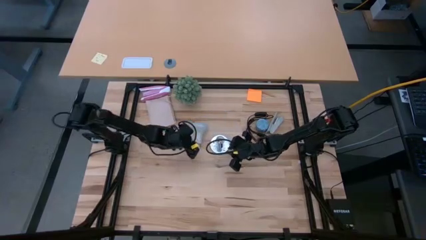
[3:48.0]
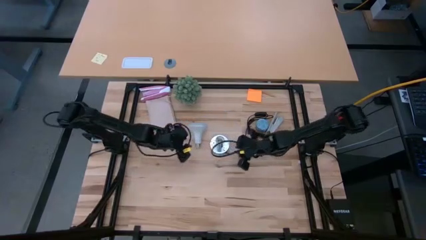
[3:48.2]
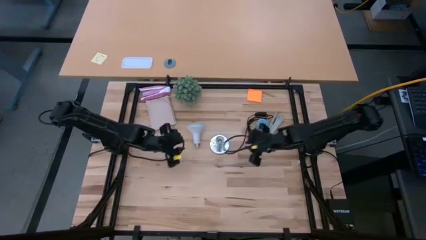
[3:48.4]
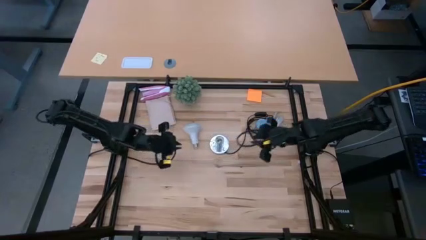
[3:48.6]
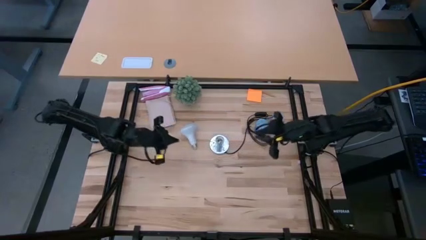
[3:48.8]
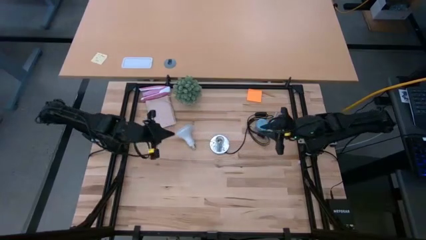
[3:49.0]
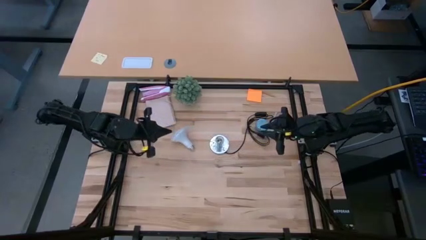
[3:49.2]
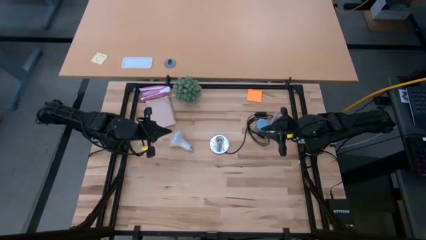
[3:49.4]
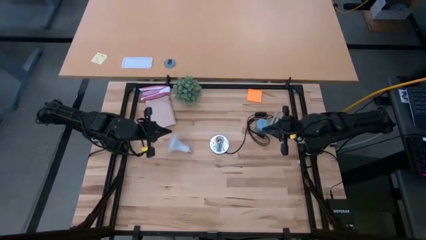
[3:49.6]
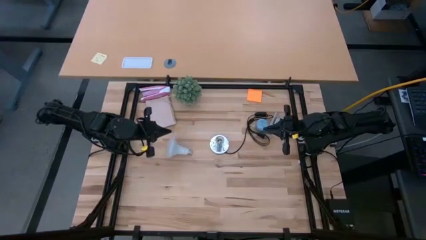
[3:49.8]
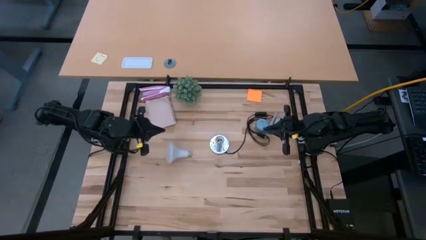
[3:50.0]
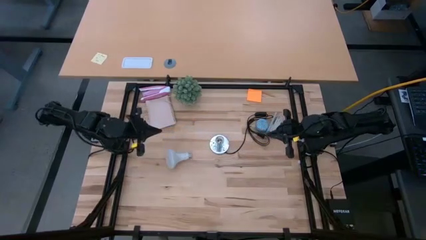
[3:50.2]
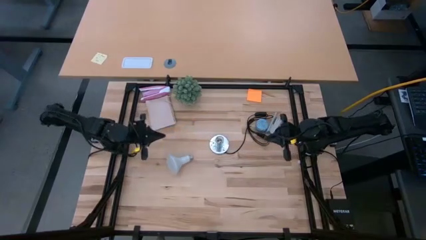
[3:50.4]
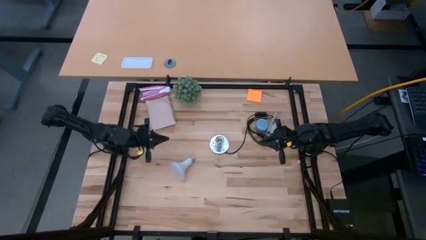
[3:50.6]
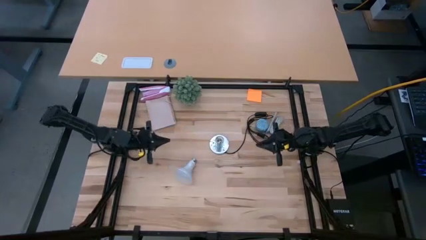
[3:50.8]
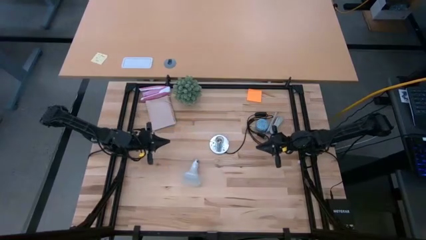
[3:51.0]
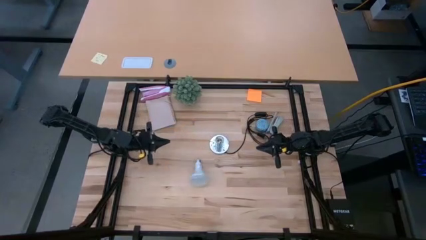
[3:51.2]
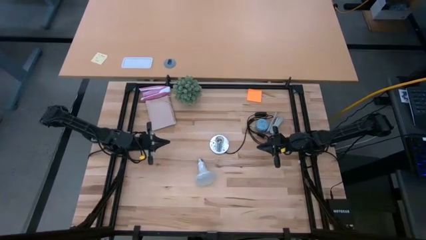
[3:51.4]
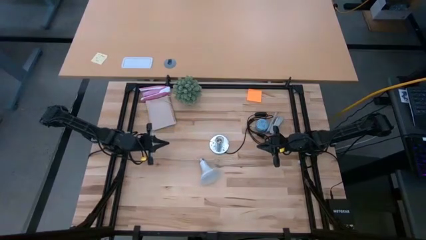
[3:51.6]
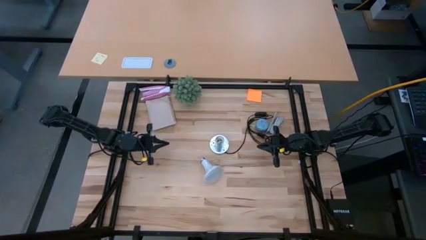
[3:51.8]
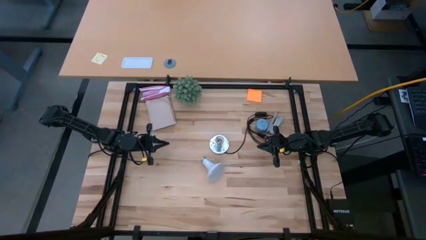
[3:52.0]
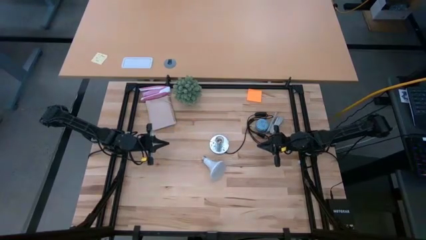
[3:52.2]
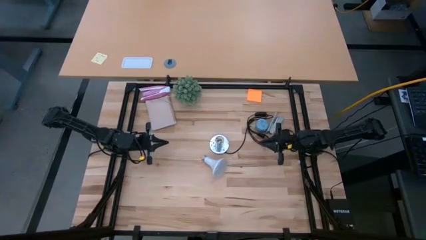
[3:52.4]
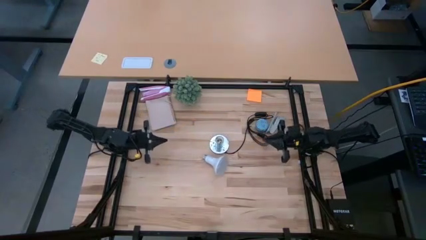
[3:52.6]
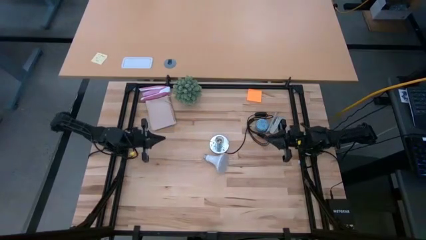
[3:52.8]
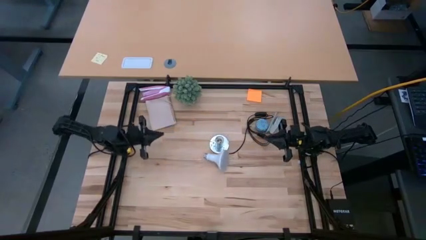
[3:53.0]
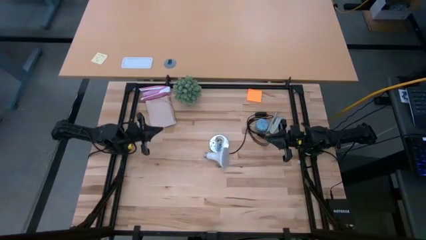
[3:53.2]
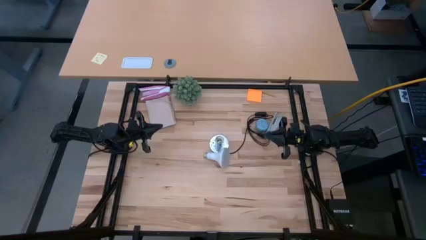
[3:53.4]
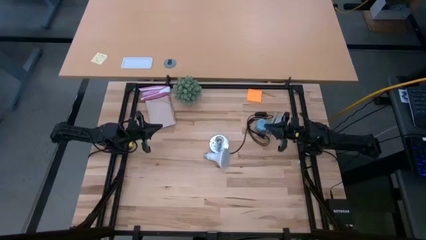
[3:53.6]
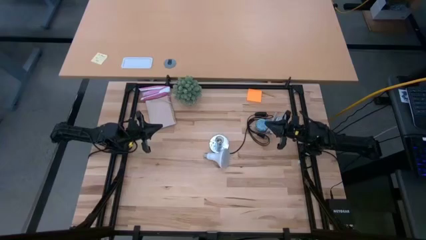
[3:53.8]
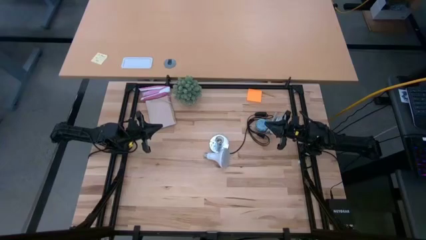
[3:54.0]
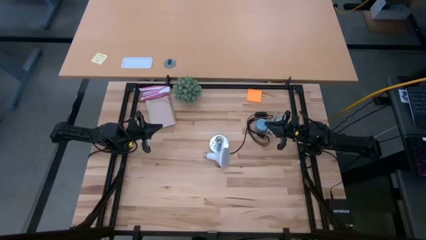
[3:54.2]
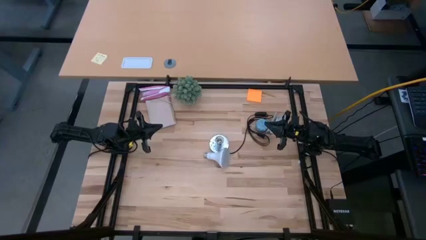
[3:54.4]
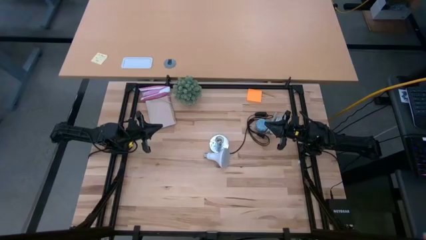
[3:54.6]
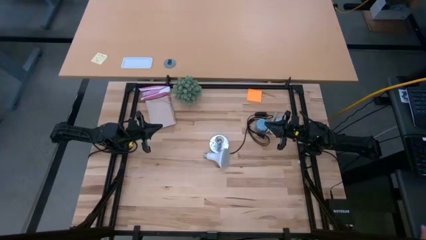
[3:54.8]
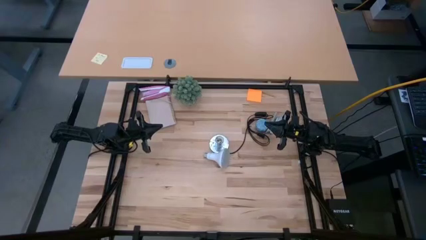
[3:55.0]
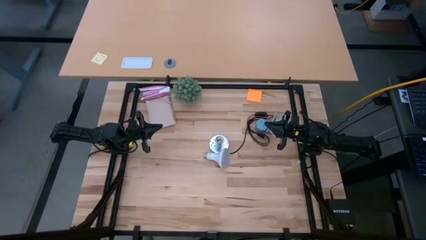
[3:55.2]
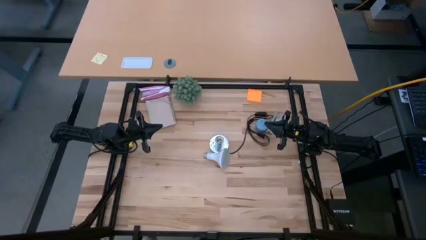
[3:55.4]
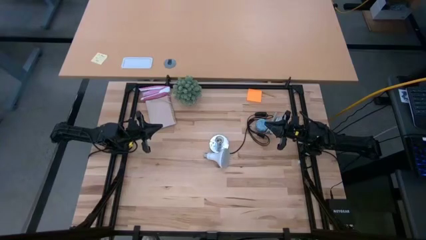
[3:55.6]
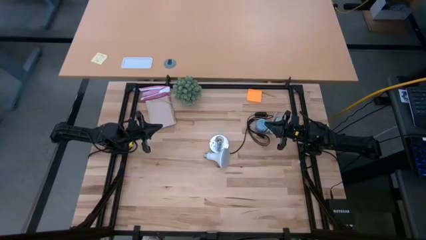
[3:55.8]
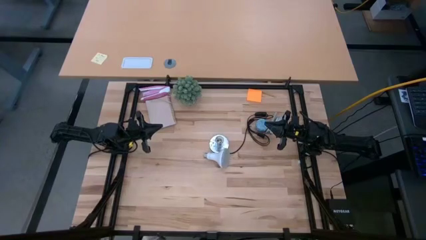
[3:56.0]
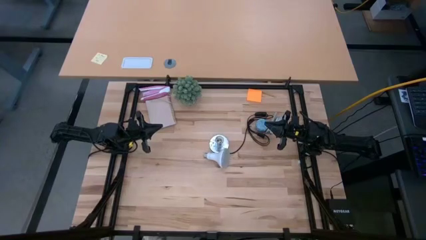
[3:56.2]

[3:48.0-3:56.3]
Task: Screw lightbulb
Return to Home Position

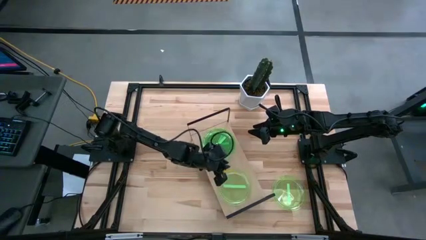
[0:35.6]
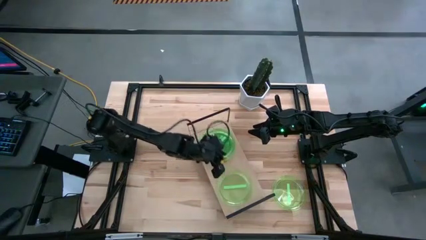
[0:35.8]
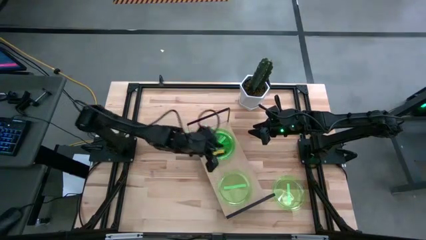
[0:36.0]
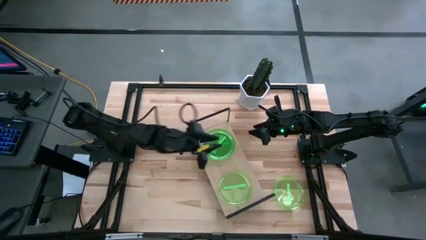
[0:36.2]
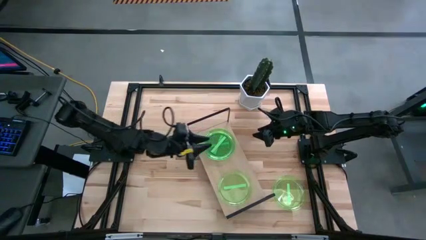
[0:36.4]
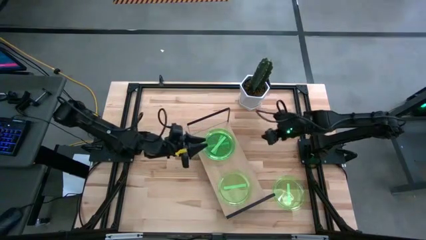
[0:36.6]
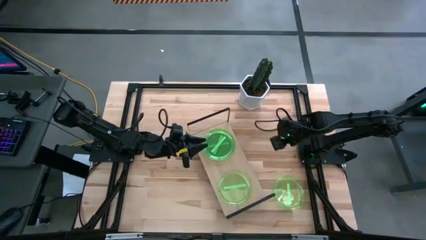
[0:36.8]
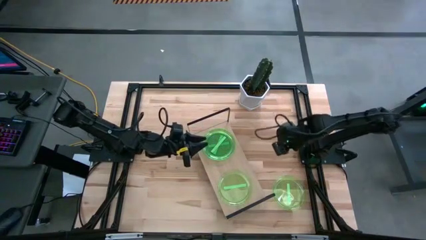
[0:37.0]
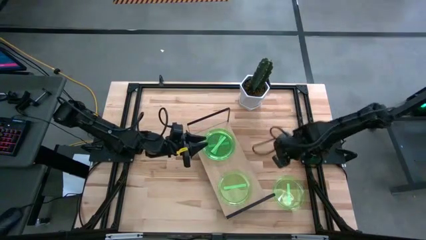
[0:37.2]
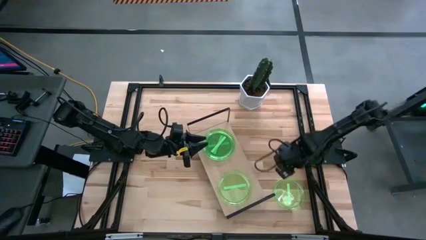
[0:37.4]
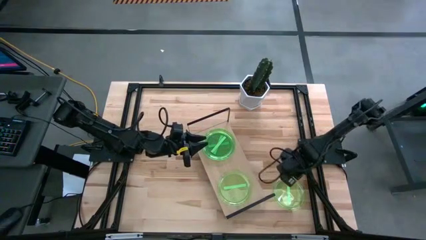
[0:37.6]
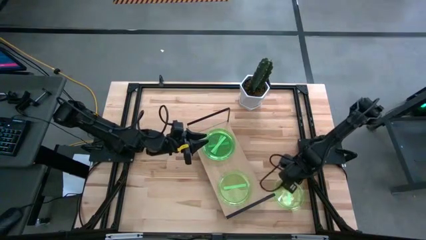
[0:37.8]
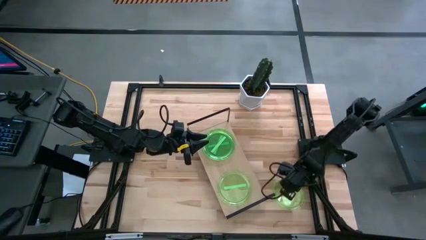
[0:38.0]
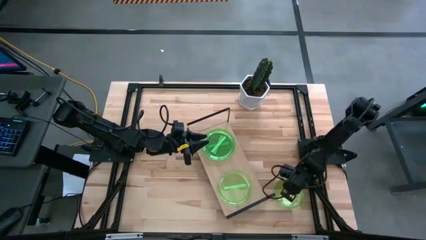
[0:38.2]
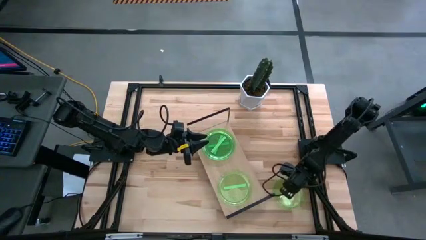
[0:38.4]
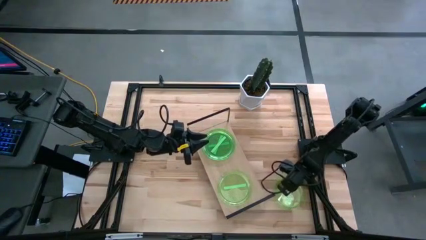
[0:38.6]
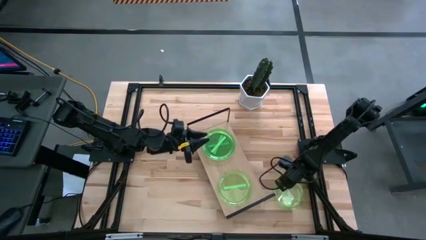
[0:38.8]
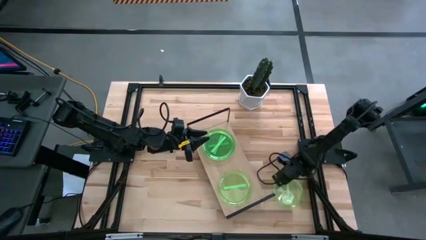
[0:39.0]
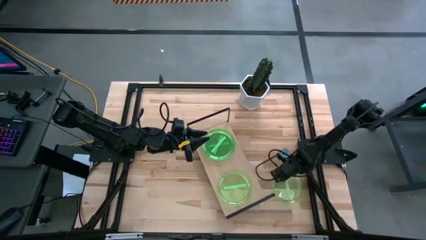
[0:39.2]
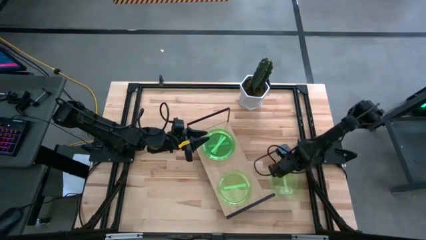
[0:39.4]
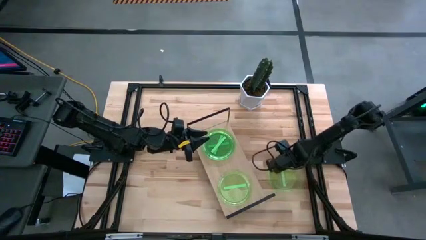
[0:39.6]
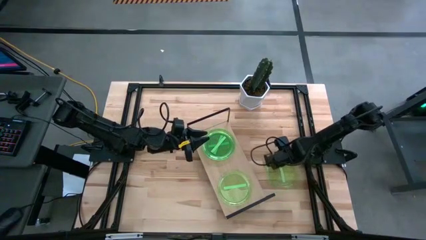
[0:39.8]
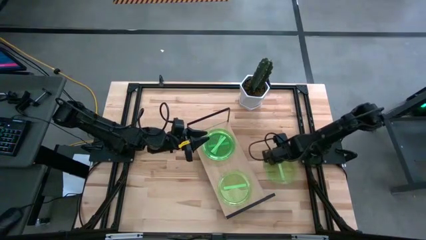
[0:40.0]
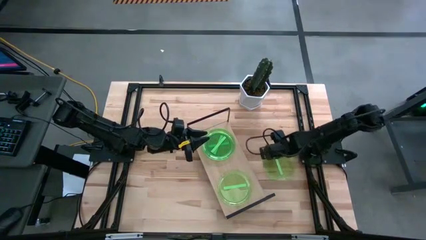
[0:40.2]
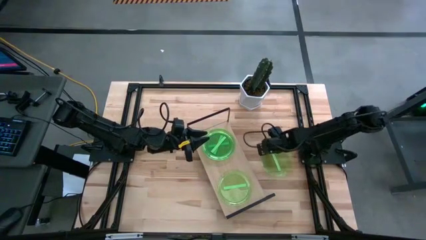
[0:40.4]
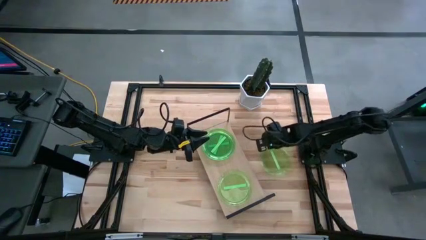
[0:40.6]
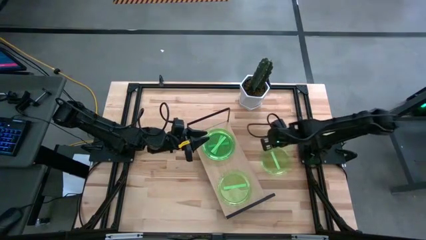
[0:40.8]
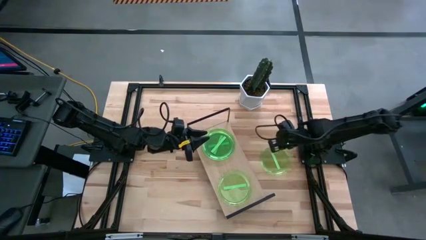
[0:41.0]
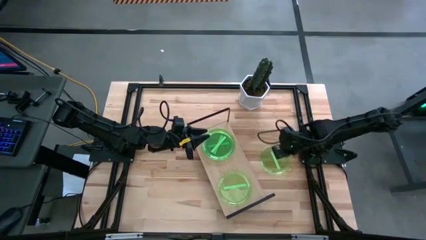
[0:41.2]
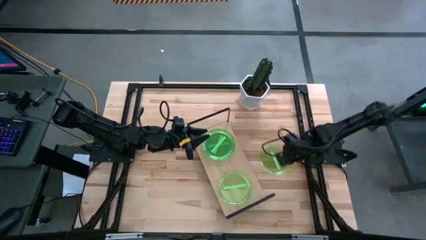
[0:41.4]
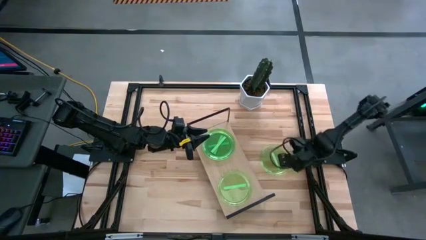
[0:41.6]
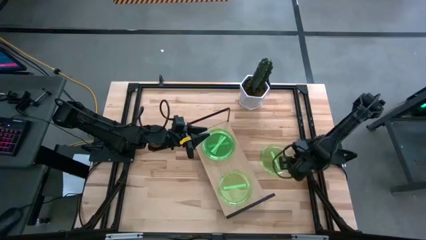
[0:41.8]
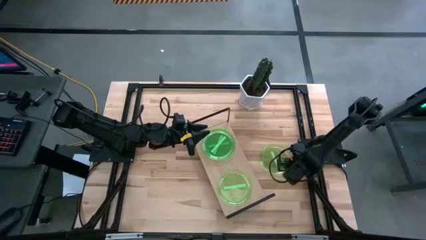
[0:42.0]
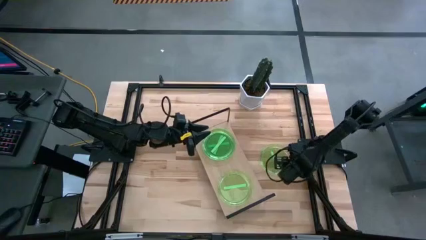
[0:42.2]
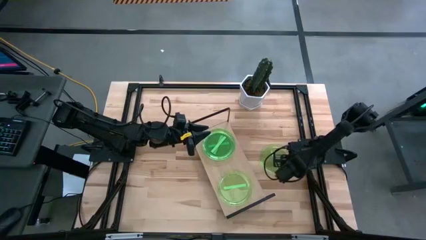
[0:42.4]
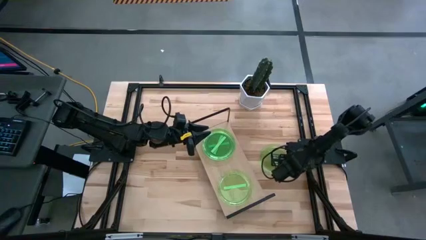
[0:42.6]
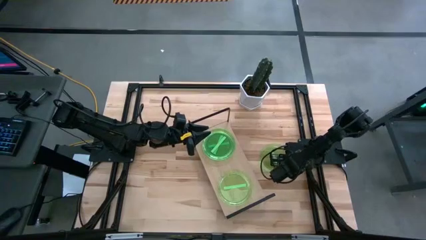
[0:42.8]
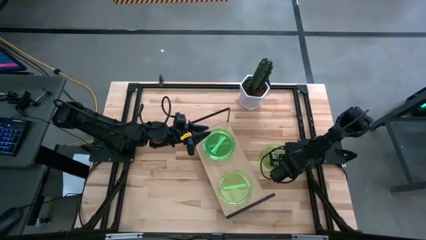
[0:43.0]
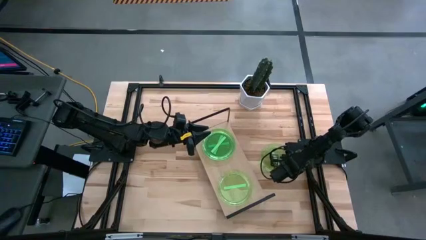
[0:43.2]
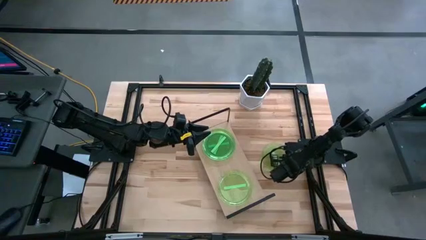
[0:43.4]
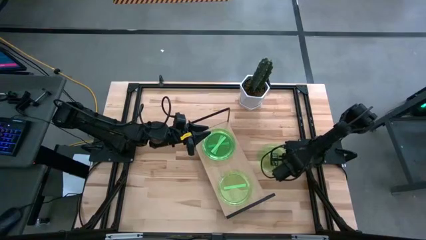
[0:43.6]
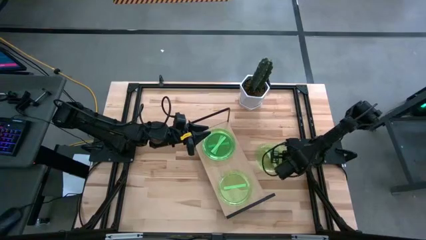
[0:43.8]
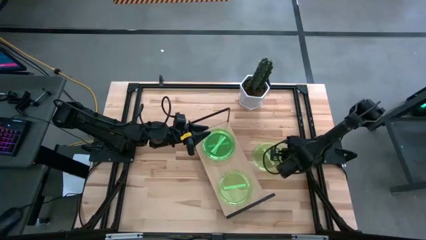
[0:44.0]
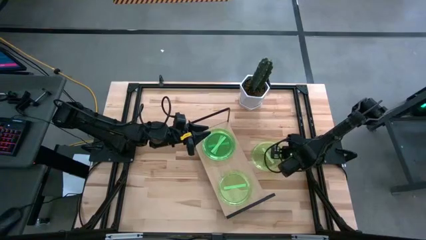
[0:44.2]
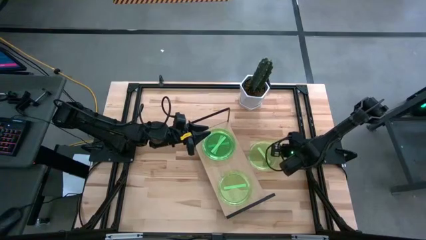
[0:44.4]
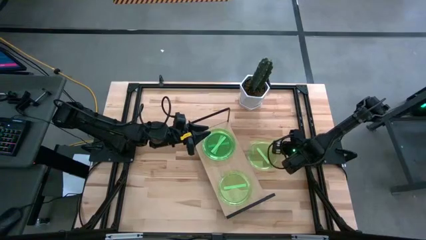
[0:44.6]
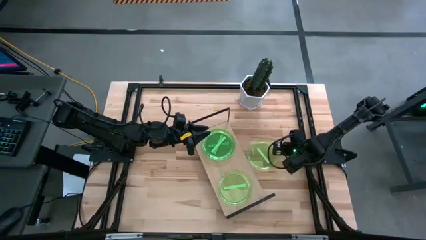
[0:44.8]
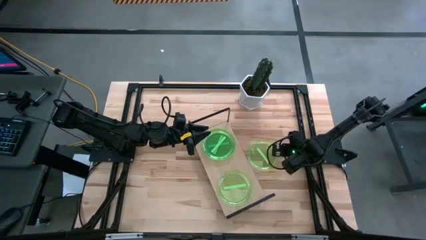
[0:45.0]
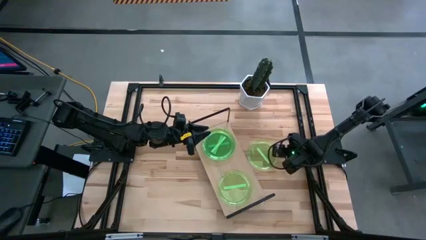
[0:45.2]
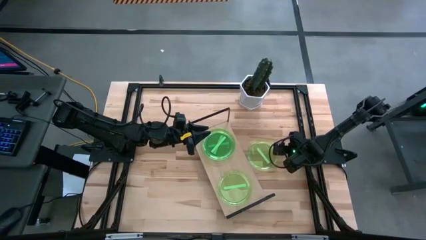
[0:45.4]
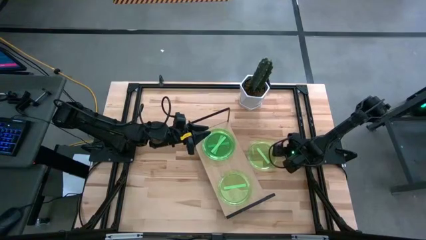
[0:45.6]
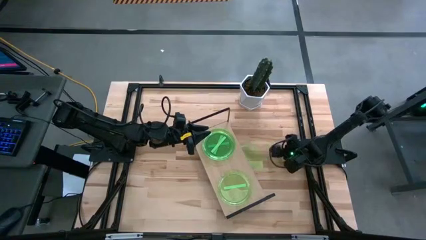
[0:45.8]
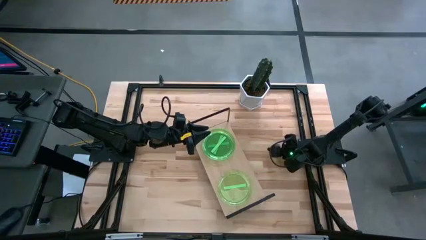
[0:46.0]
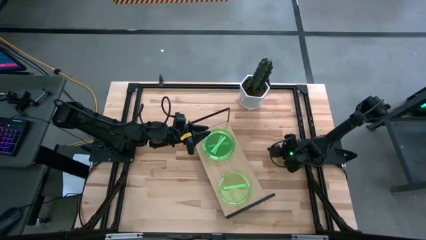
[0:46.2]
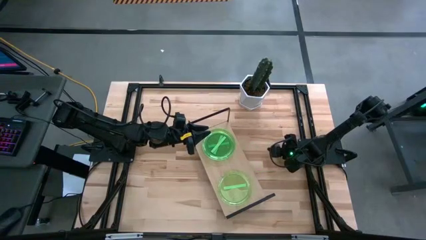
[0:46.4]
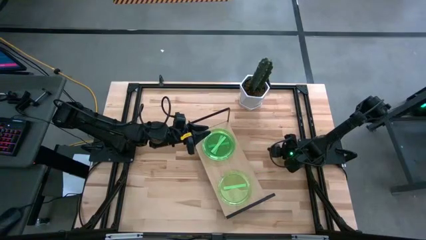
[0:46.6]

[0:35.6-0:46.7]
Task: Place and stack plates onto a shelf
Stack the green plate on top of the bottom green plate on the shelf
